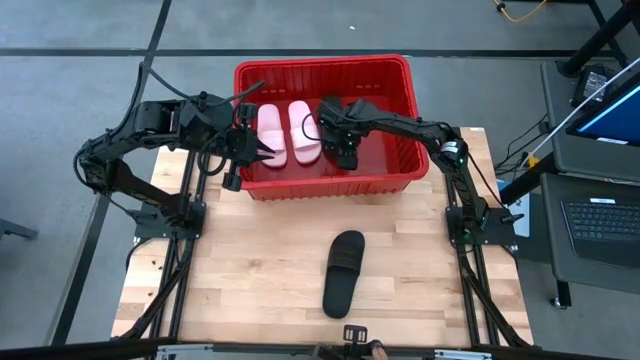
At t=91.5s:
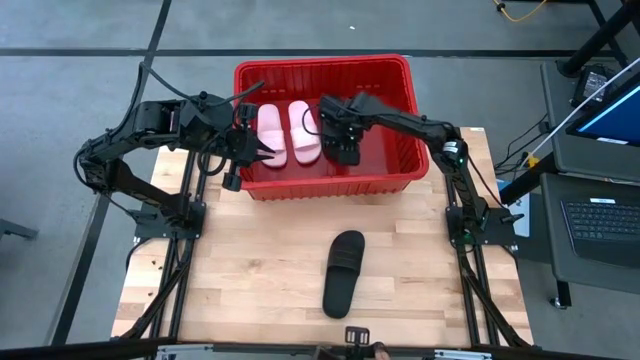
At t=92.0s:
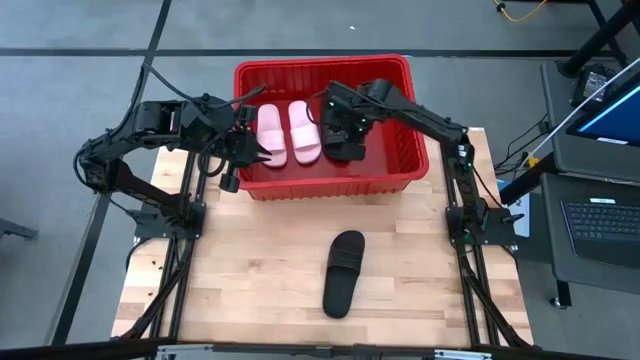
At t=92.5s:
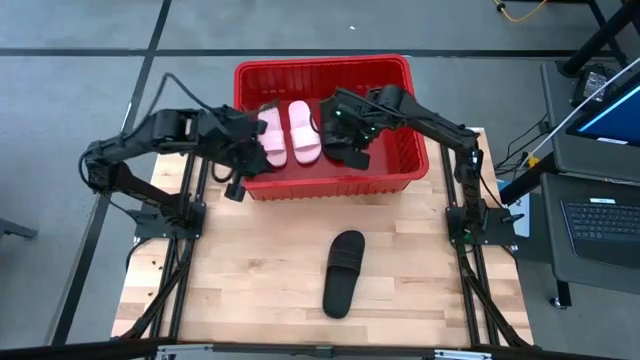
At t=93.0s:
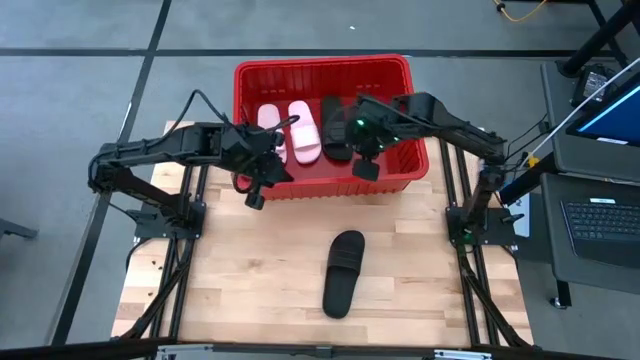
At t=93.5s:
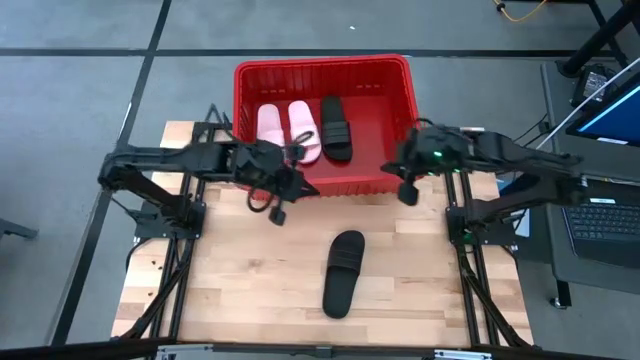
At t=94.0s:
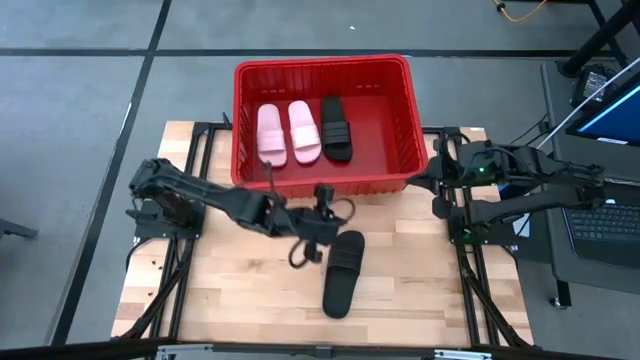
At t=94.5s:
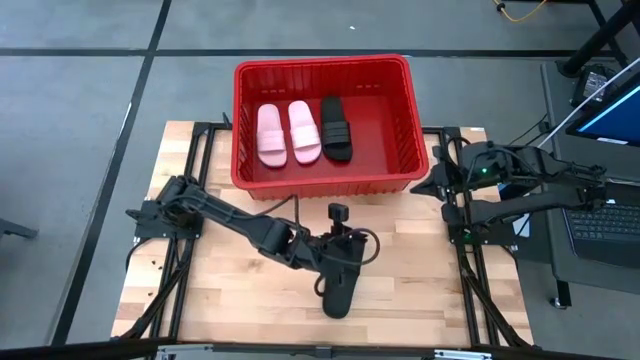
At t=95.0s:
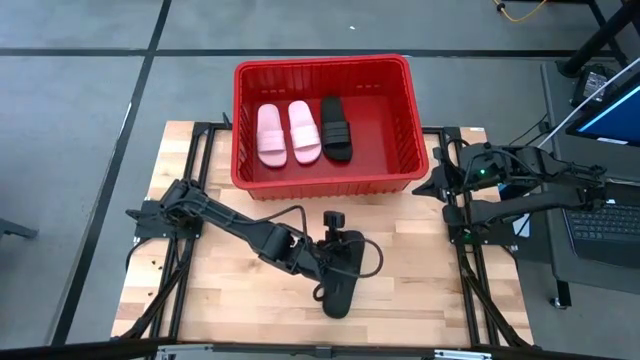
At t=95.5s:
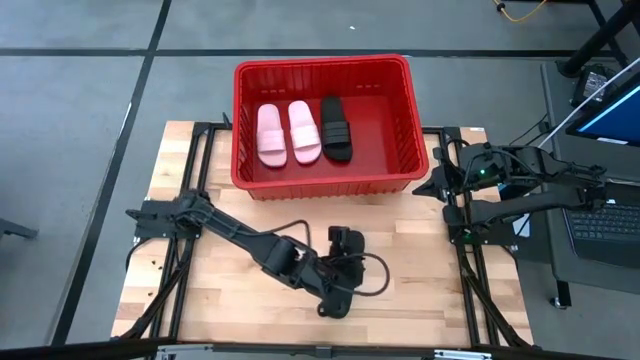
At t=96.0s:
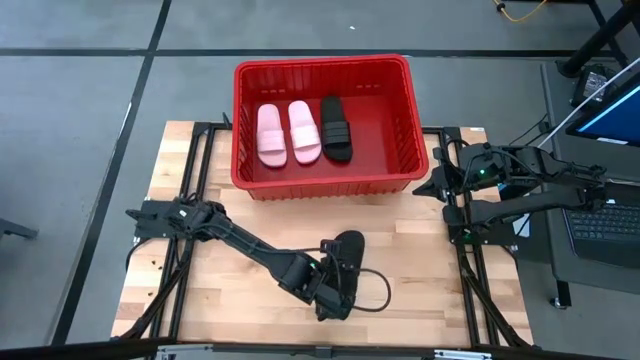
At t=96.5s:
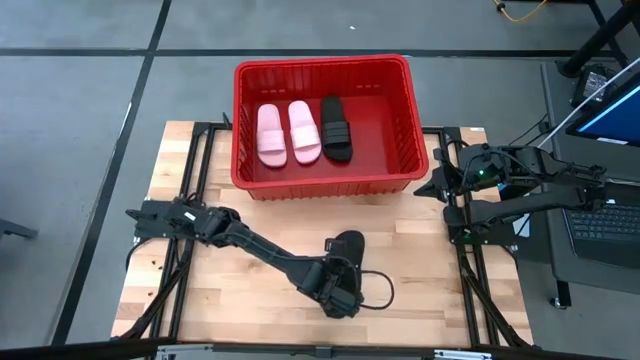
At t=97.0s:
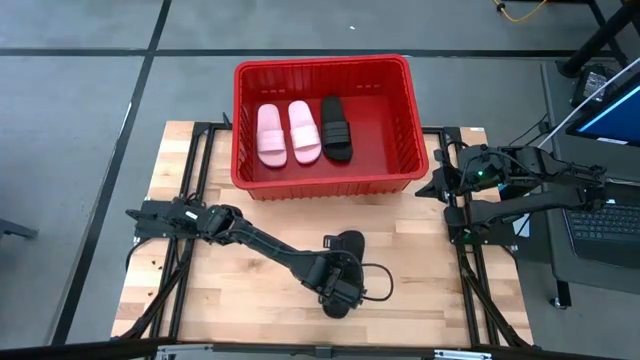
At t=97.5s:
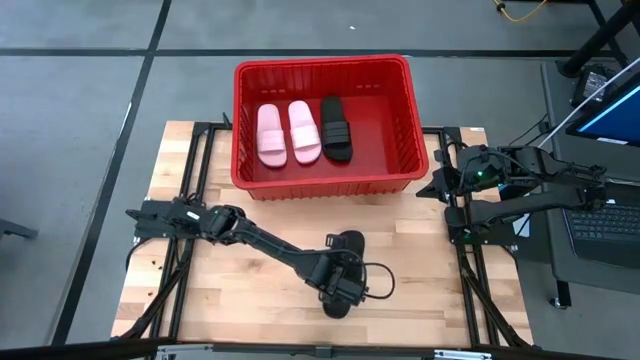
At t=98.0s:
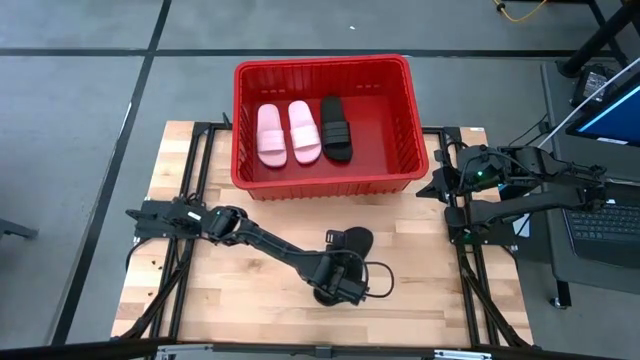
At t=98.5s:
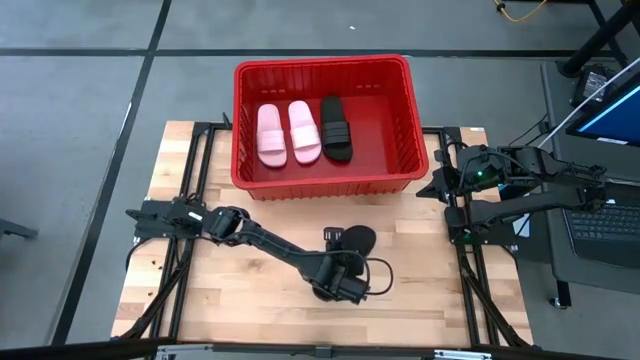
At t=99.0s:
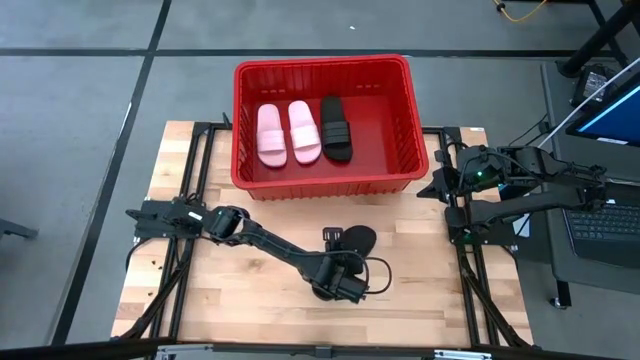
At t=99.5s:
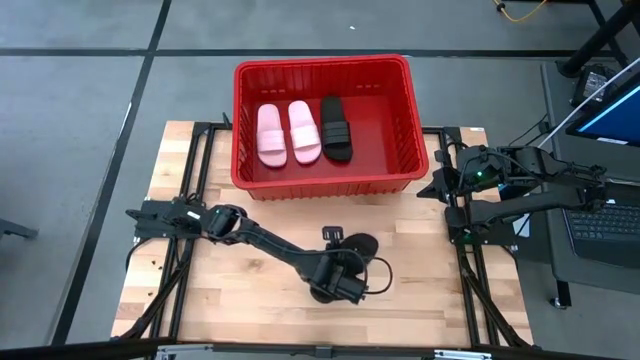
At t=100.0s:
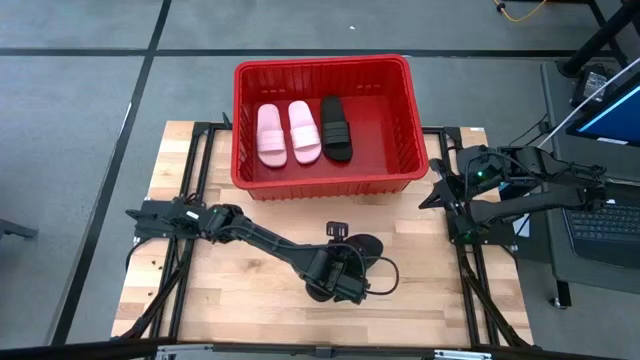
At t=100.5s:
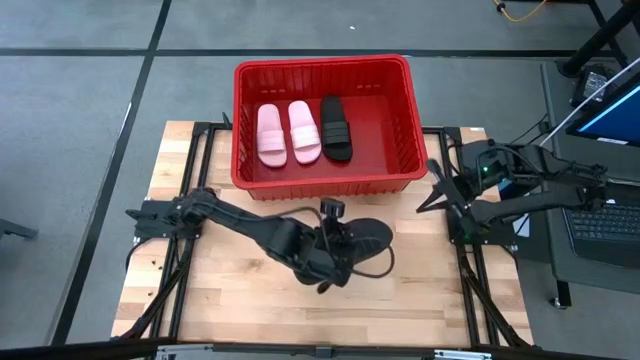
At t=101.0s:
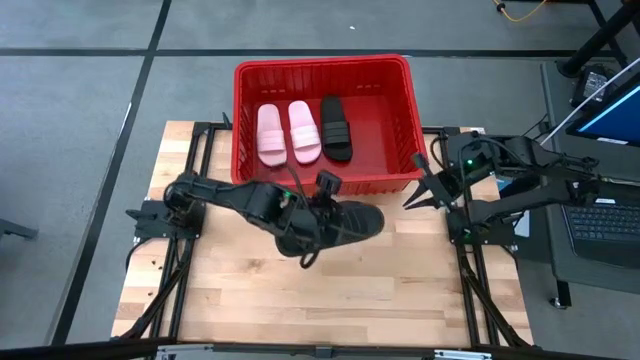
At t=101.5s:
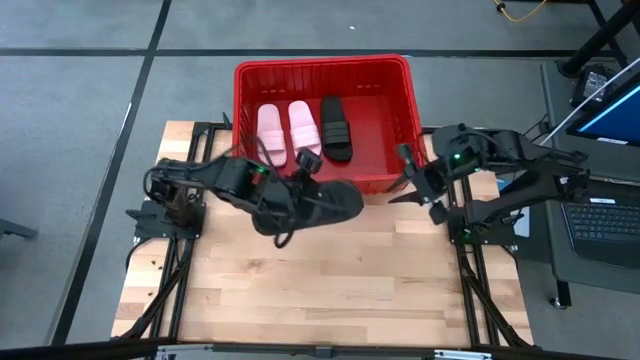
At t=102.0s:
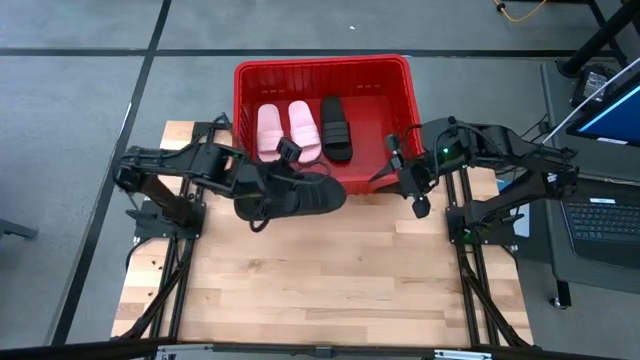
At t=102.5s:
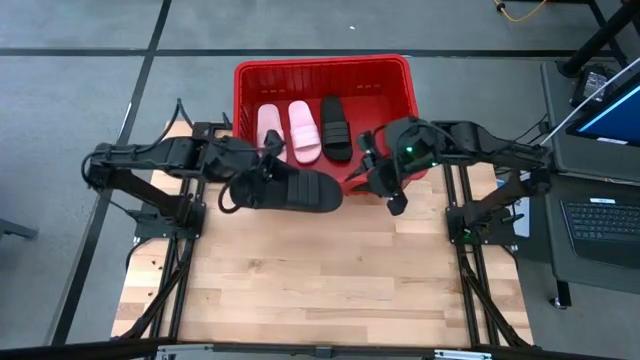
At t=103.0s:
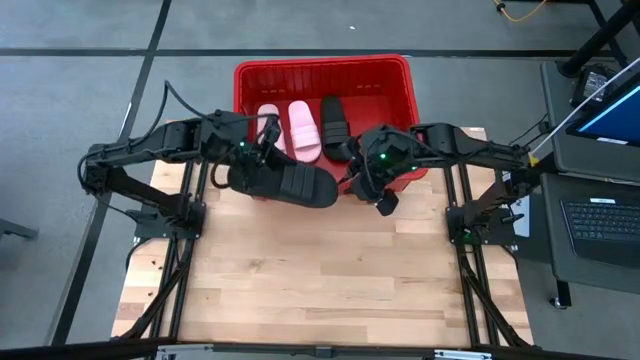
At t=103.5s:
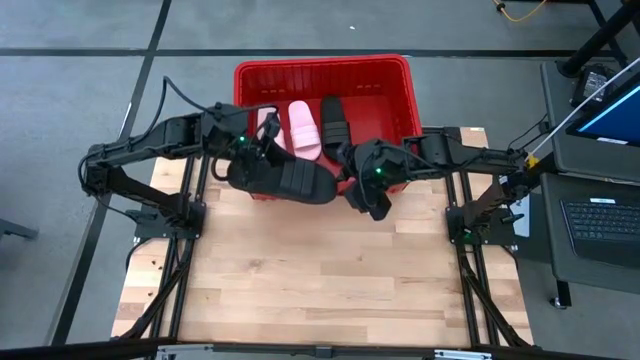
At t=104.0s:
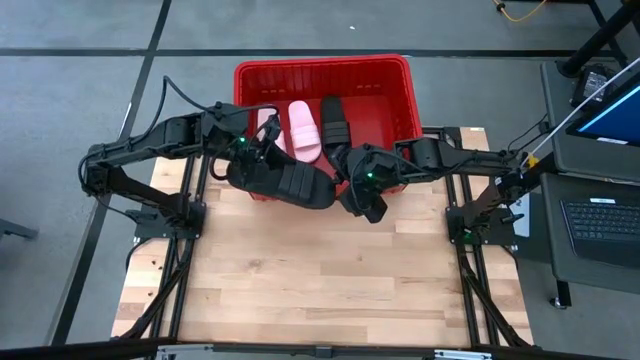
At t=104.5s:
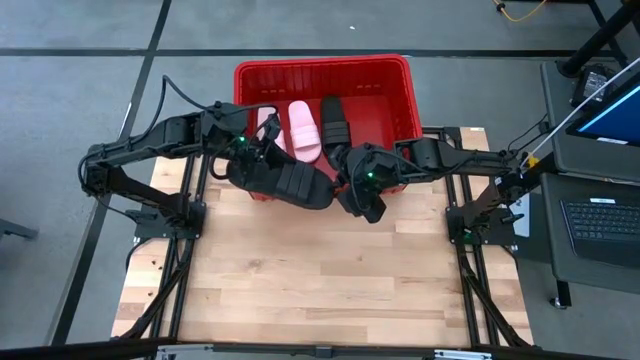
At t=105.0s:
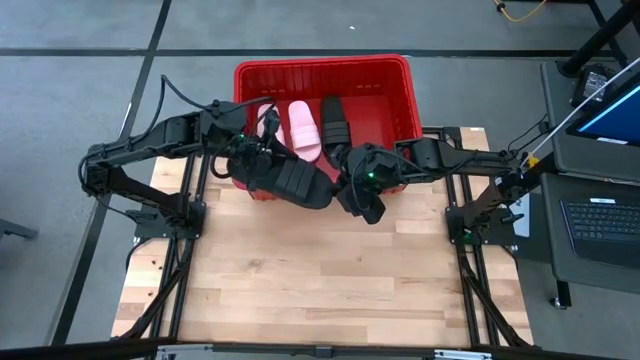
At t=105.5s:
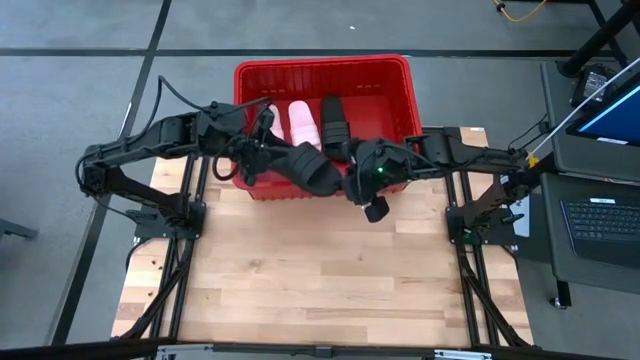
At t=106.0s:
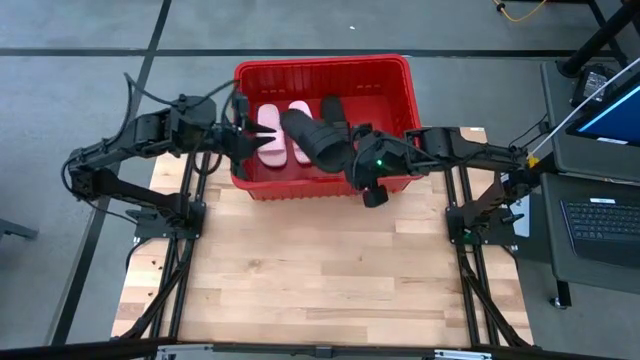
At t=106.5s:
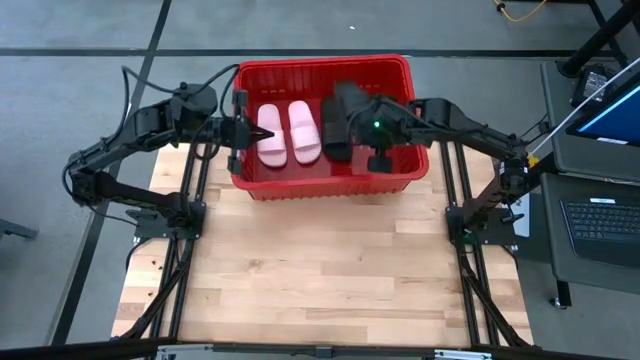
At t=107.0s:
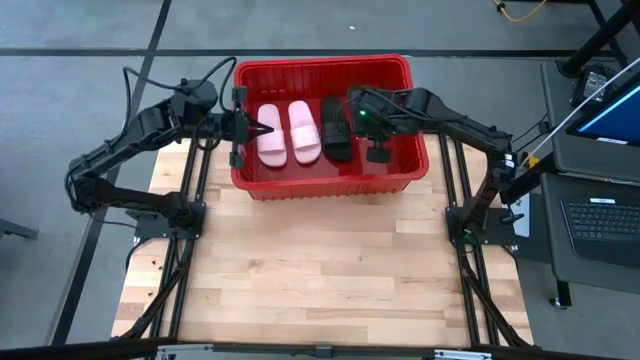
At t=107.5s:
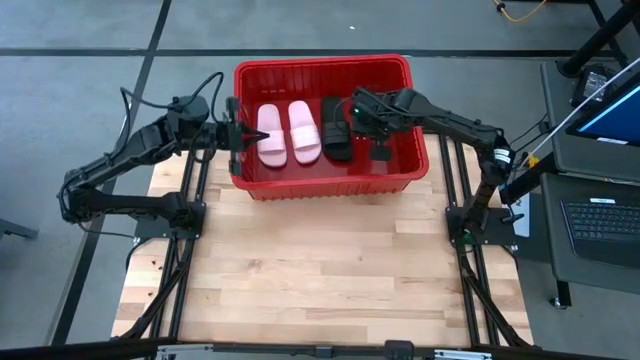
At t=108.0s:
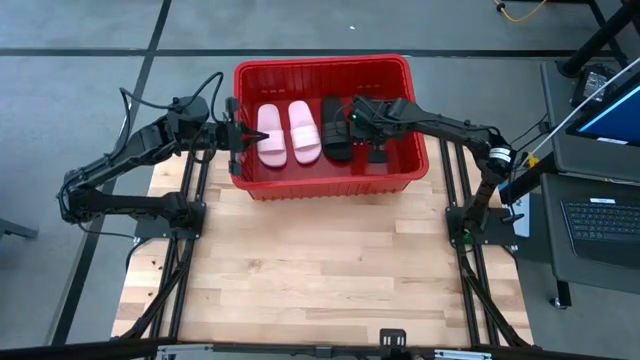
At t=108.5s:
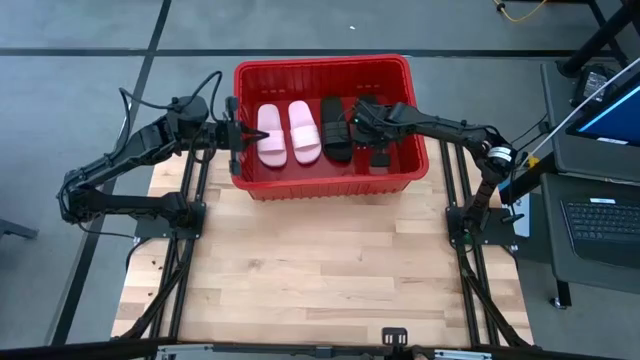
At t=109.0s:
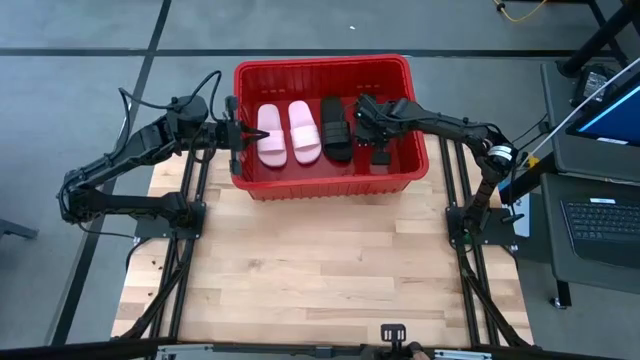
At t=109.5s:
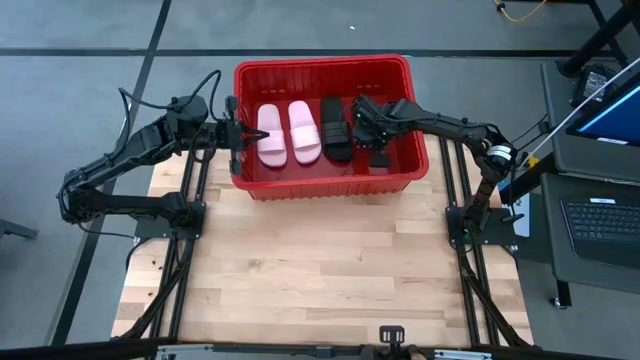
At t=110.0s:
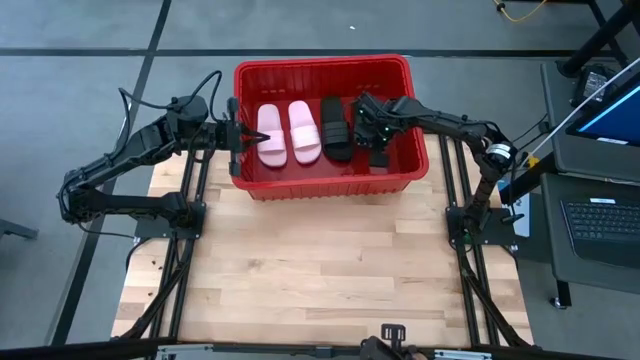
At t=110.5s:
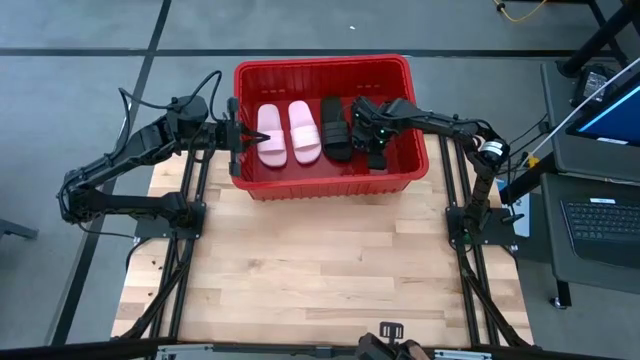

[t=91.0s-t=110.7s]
Task: Pick and place slides into bin
Put the black slide into the red bin

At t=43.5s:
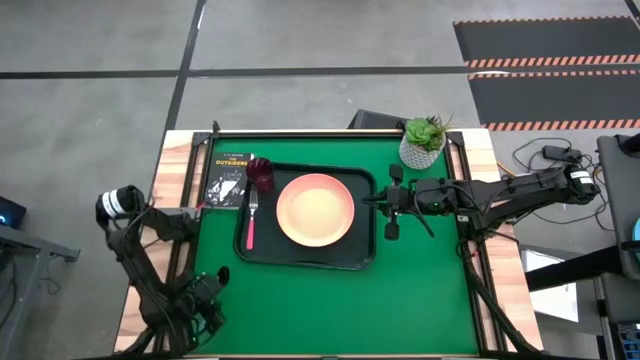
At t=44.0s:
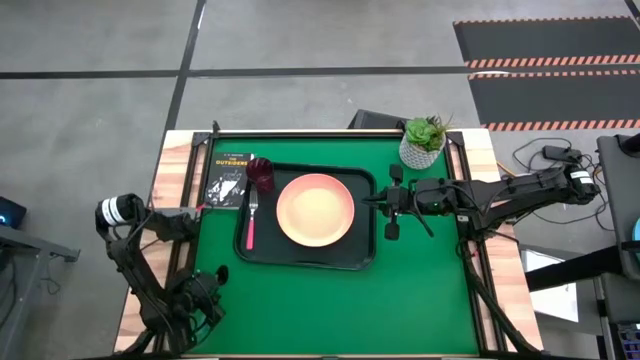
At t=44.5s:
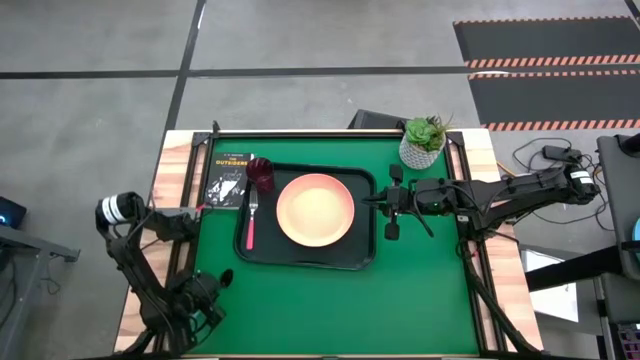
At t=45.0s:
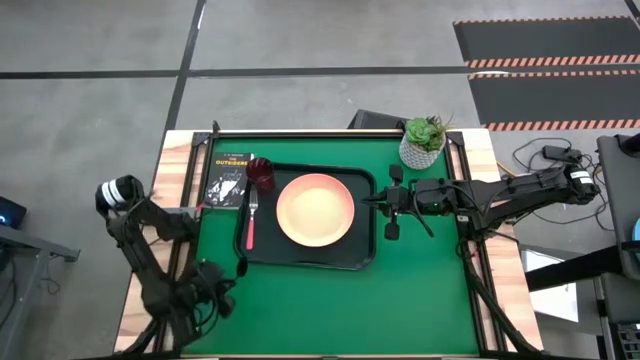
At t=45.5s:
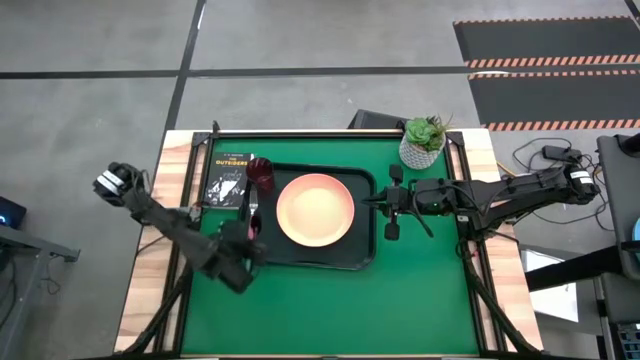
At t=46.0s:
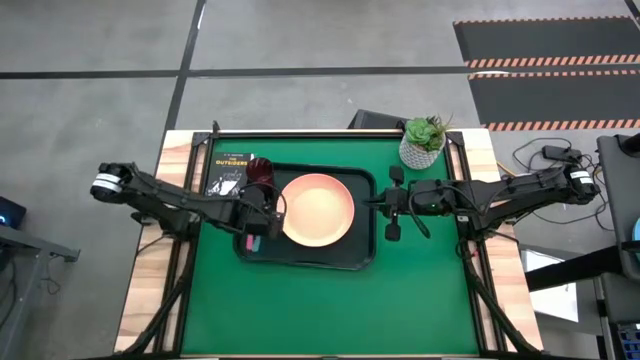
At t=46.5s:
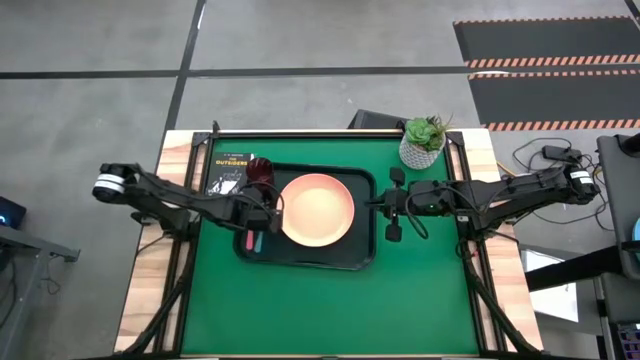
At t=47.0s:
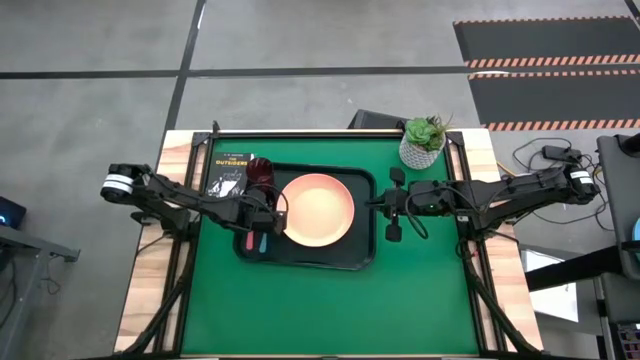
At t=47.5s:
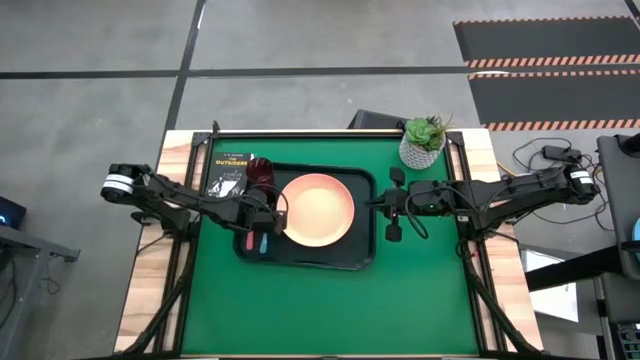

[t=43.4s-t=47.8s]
Task: Pick and place plate/cup/fork/spoon on tray
Put the spoon on the black tray to the right of the pink fork
